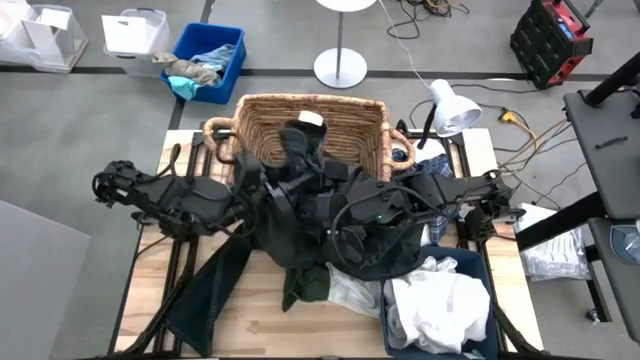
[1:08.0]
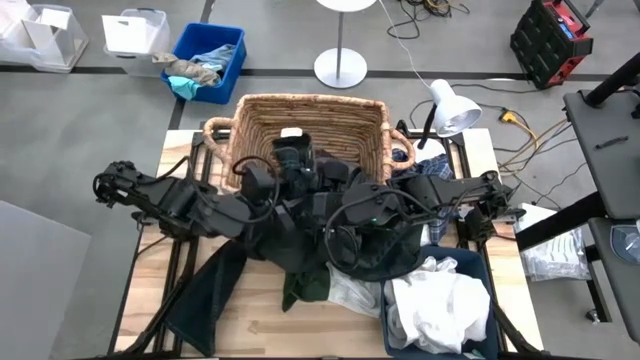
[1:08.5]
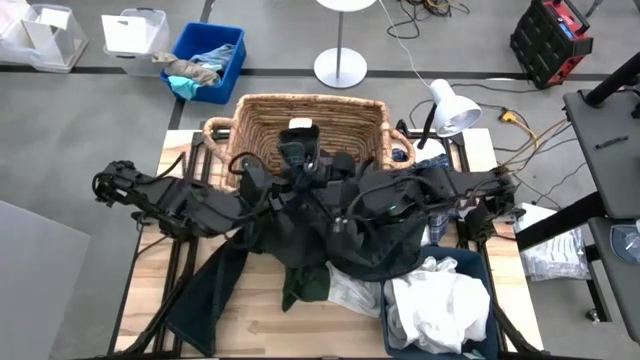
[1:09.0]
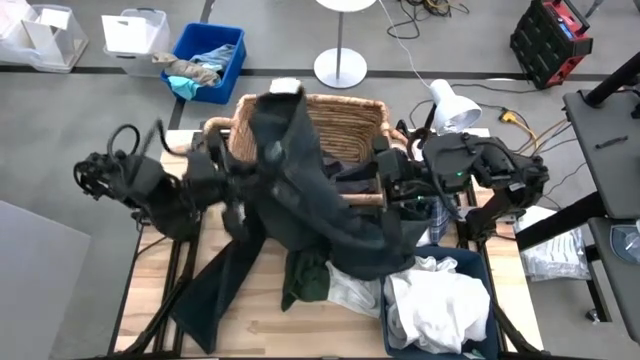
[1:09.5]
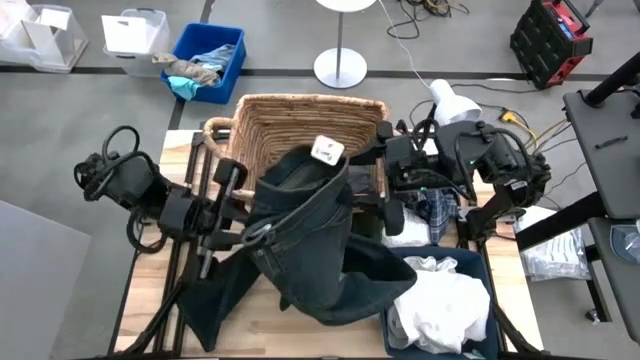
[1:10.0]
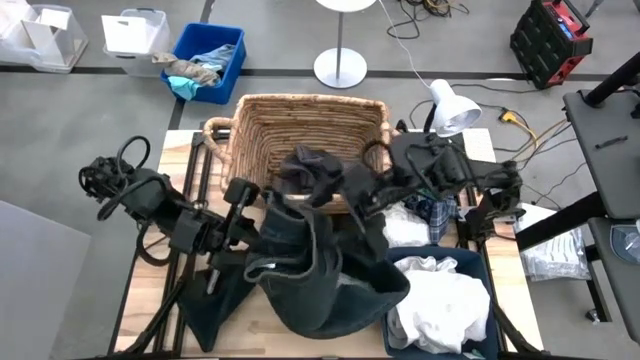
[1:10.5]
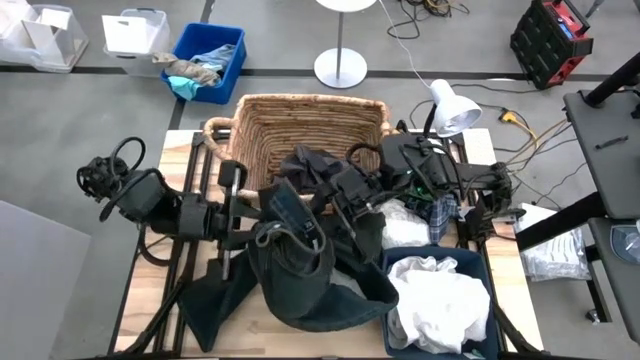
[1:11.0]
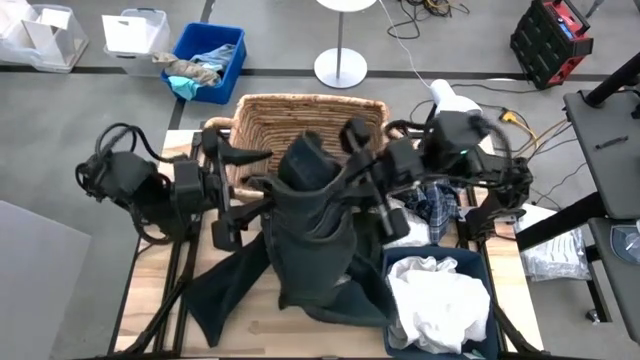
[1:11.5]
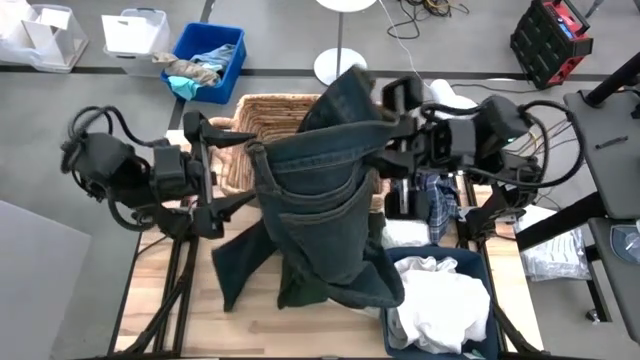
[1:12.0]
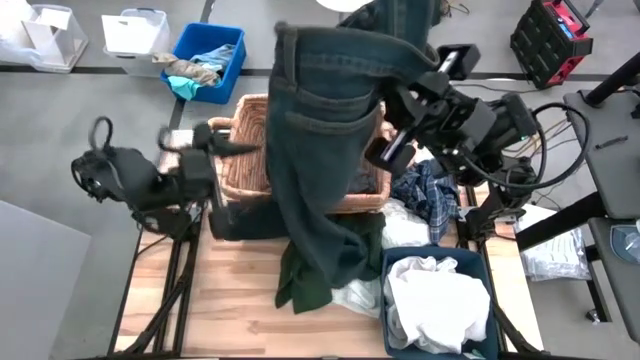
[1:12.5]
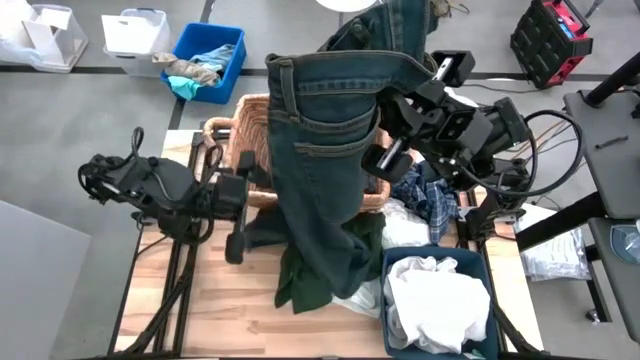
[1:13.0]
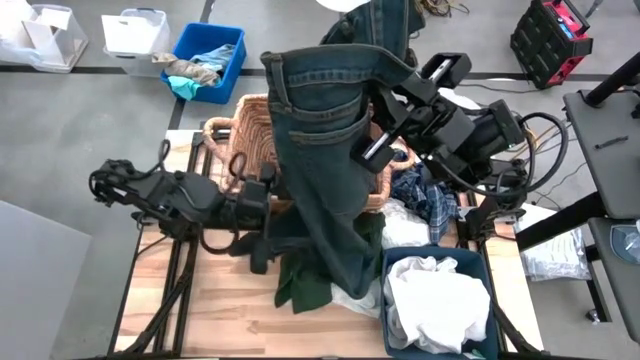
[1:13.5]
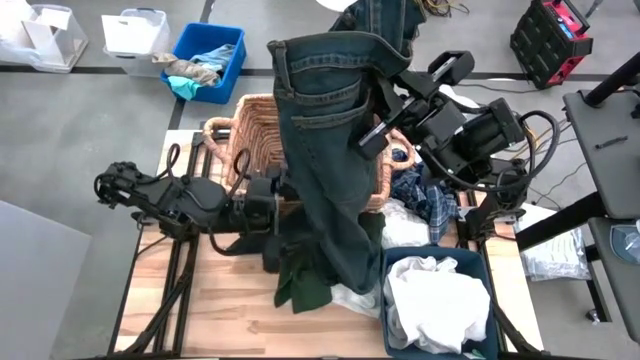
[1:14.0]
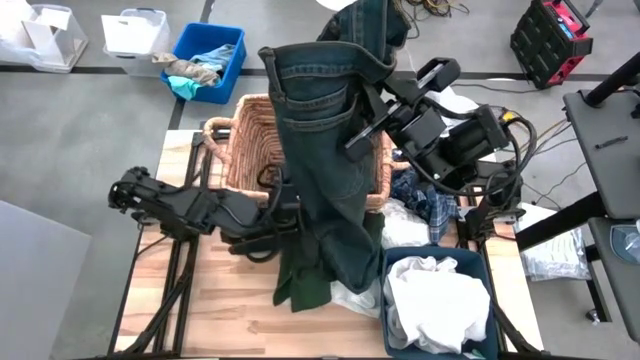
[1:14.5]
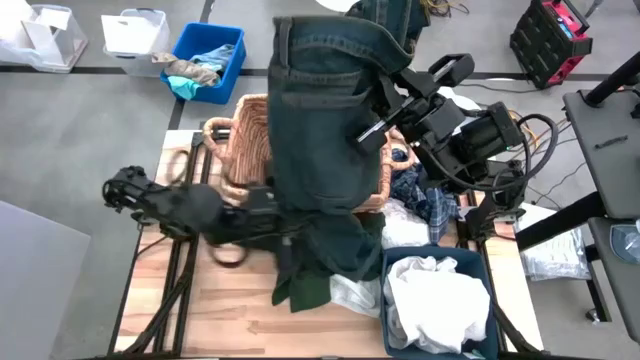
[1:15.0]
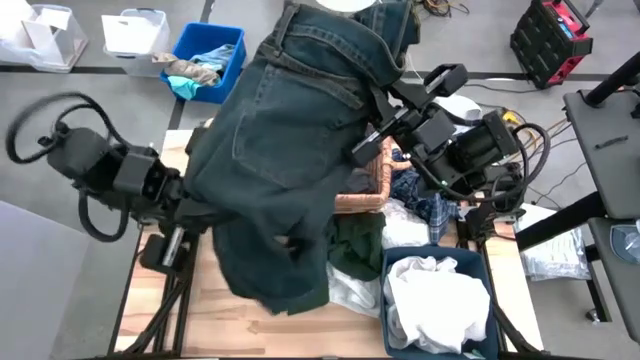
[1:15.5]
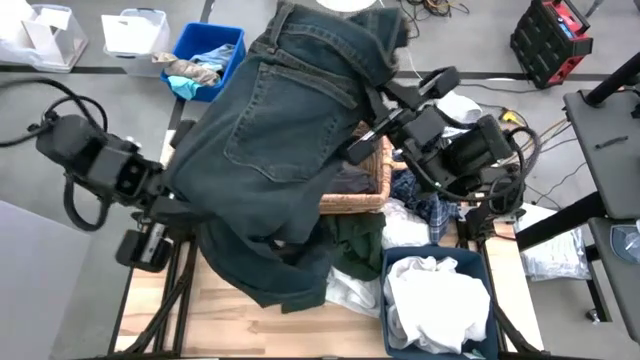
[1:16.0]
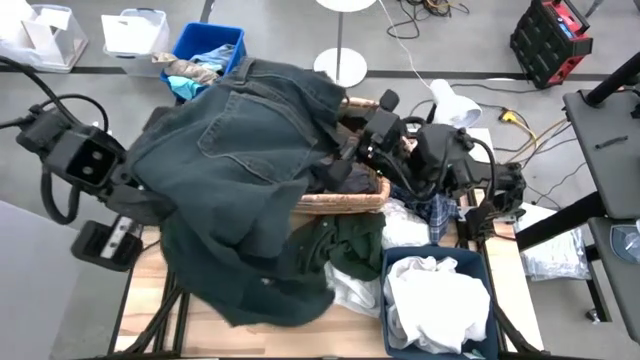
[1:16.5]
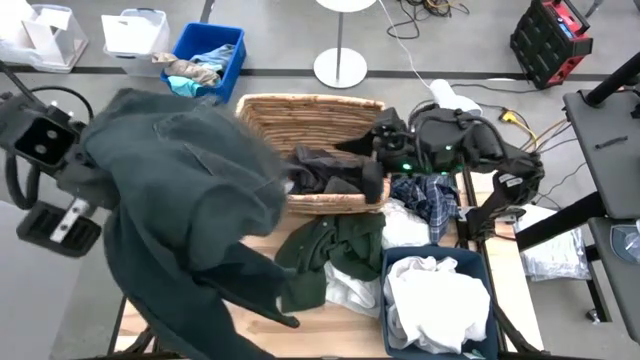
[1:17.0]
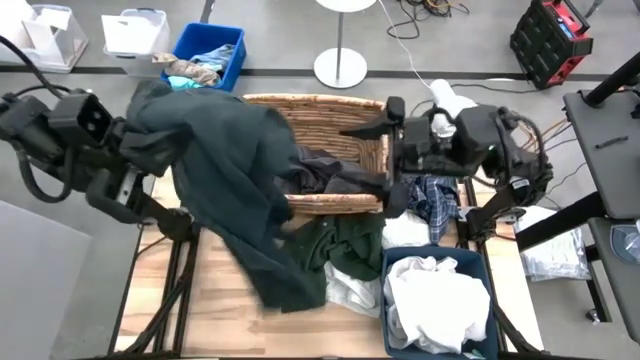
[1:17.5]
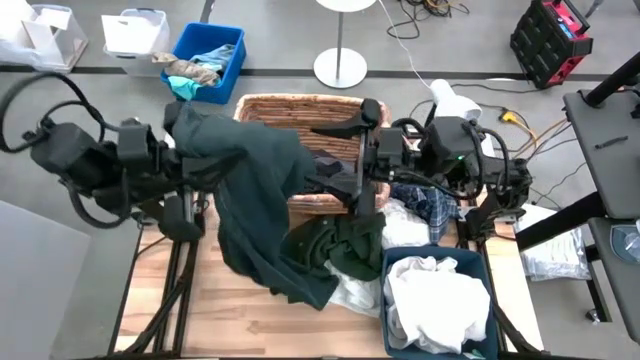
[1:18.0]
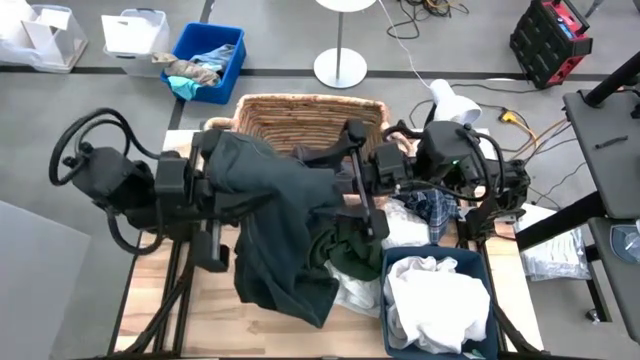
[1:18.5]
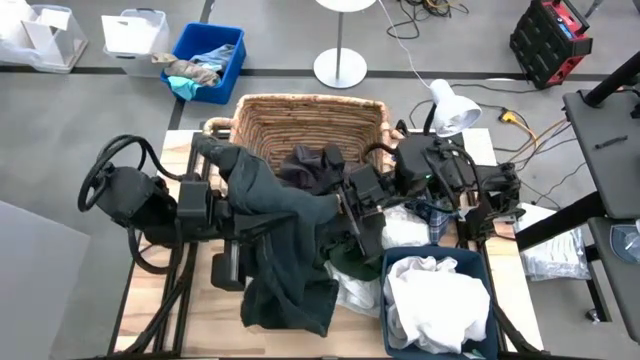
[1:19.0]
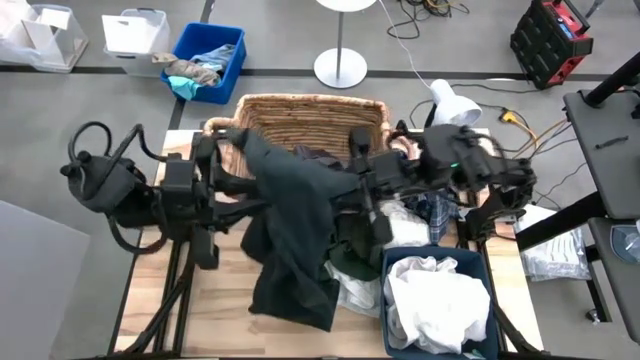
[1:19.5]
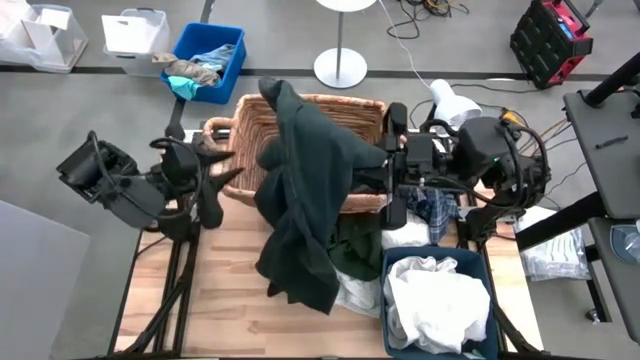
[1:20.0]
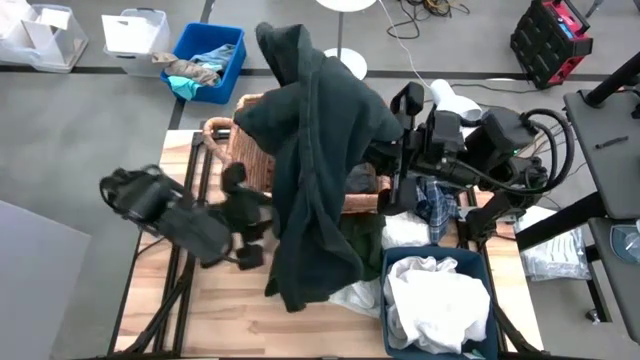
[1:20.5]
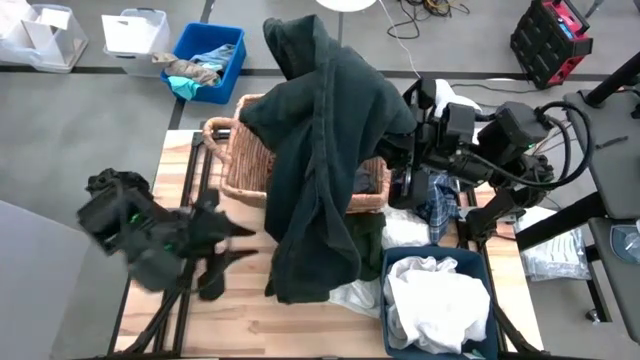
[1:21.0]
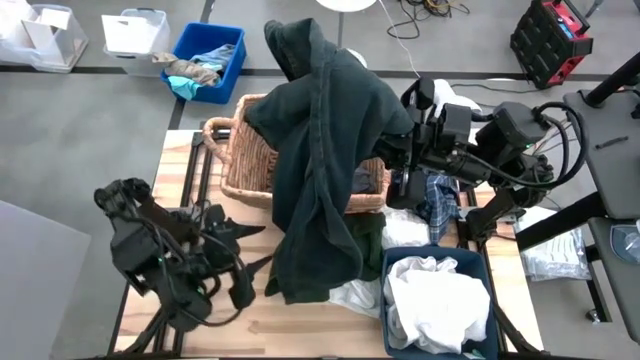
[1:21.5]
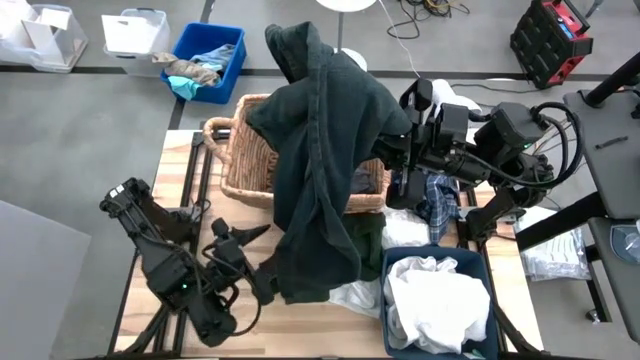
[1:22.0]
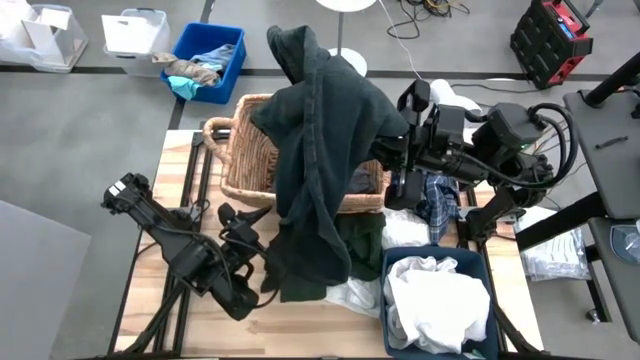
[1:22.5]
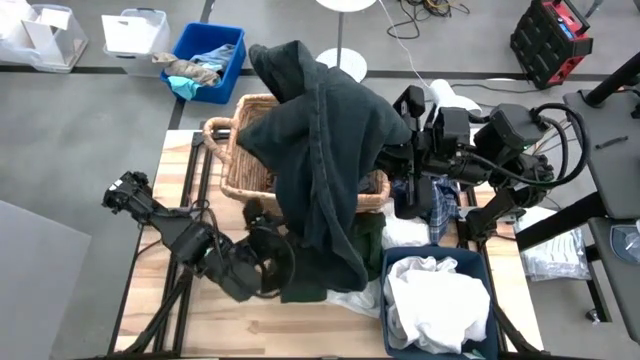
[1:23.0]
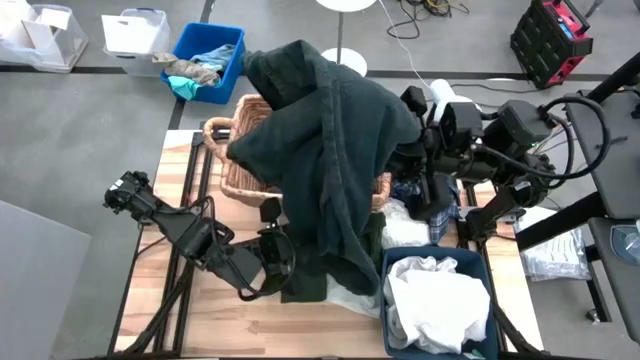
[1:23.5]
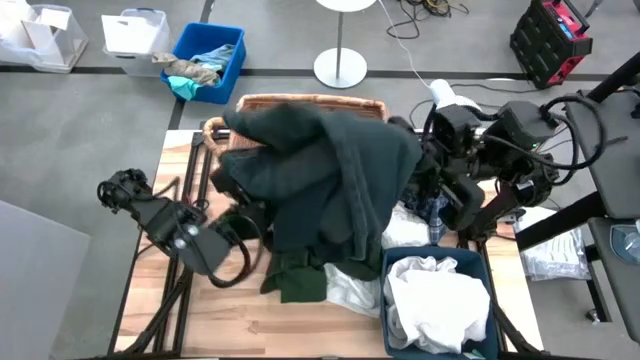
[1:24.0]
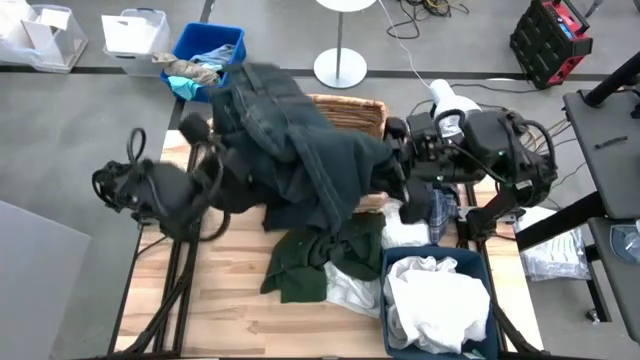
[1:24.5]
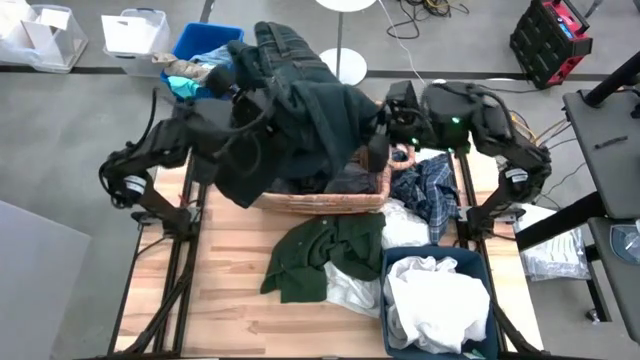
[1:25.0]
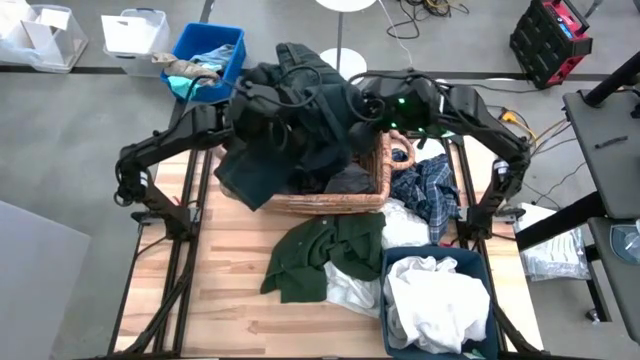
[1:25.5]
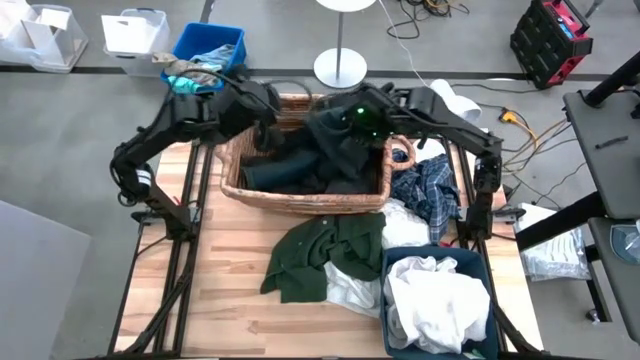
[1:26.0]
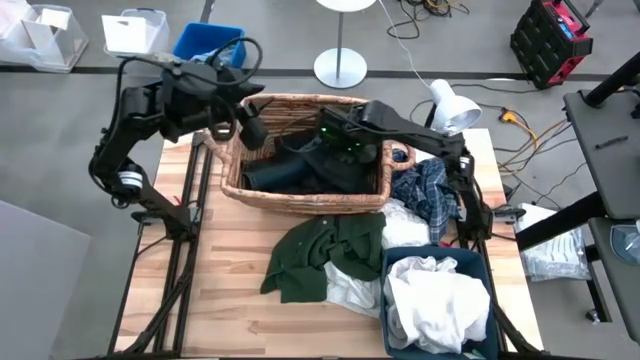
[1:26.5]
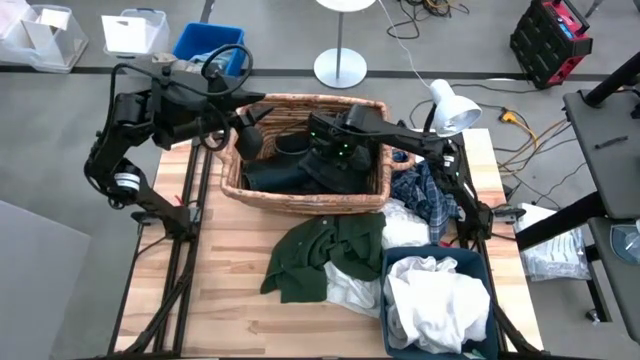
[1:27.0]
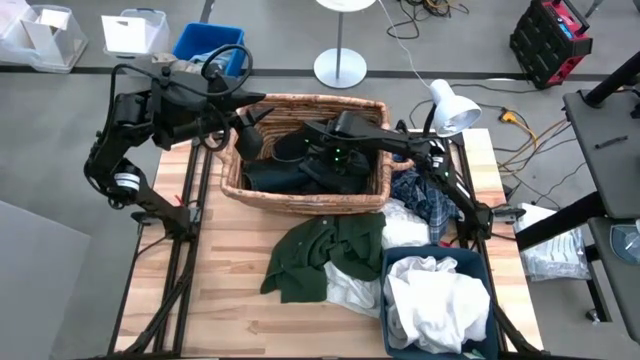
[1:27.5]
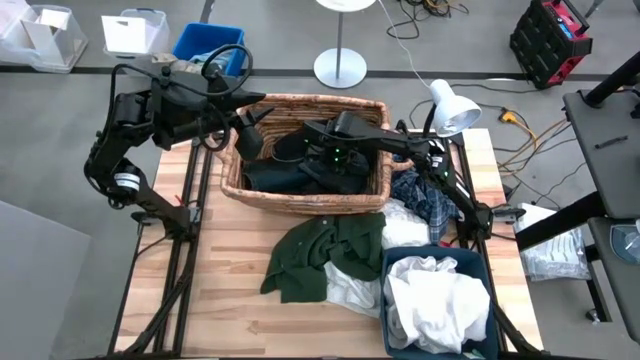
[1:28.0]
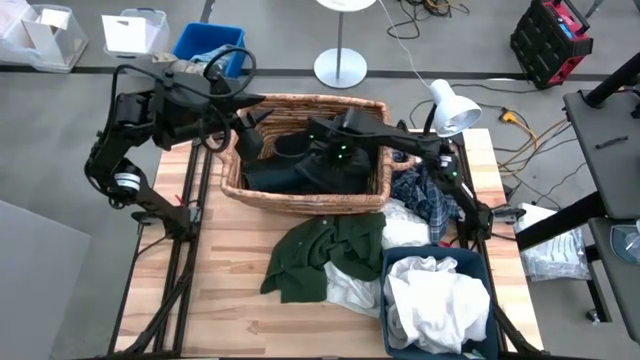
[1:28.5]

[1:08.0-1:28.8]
Task: Sort clothes
Put the dark blue jeans into the brown laundry basket

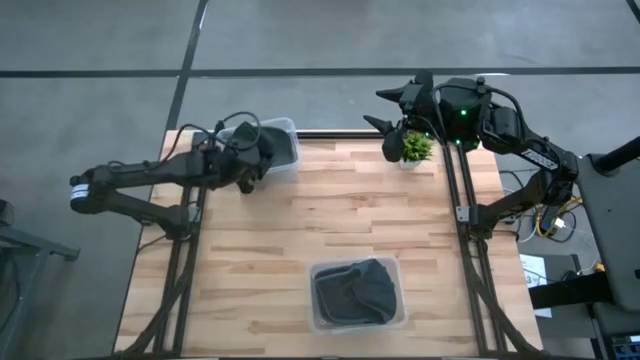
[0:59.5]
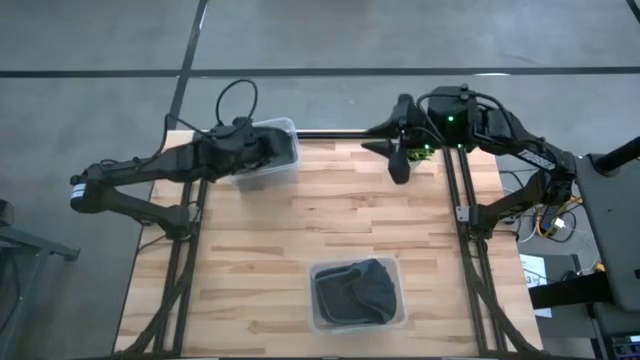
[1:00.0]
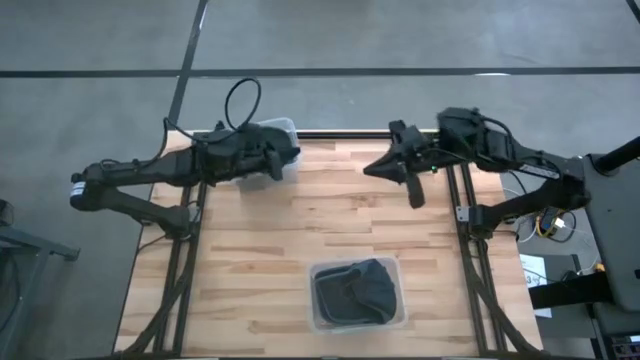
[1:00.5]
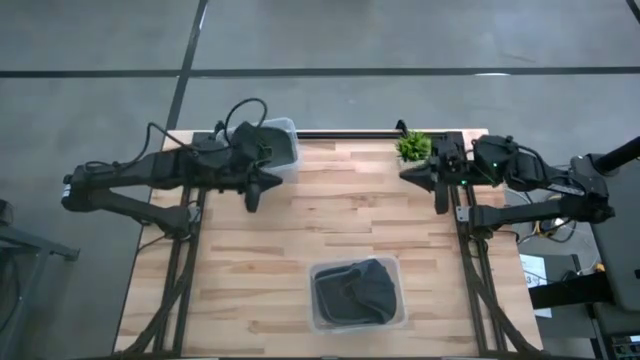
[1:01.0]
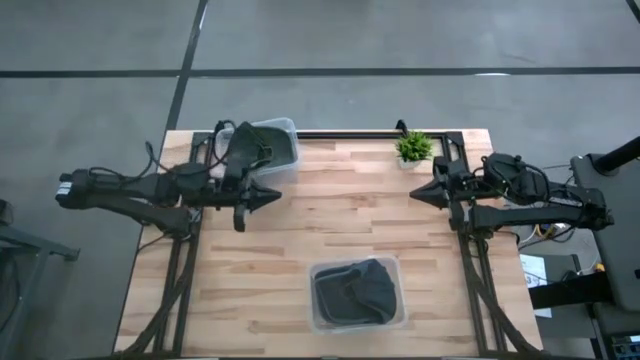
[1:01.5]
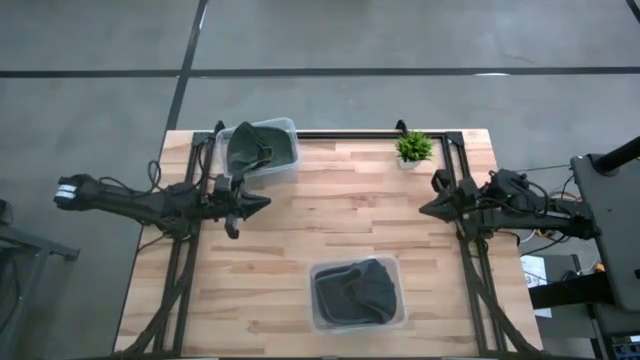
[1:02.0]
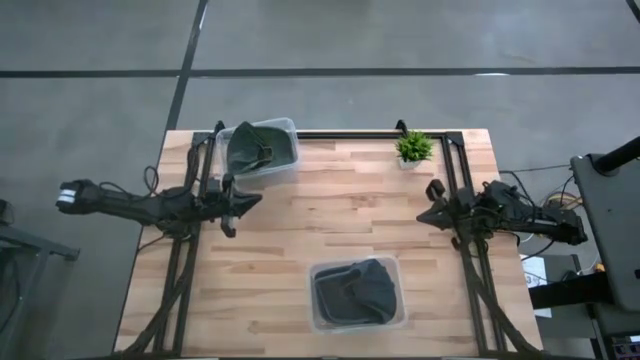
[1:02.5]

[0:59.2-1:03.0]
Task: Pick & Place hat
Return to Home Position
